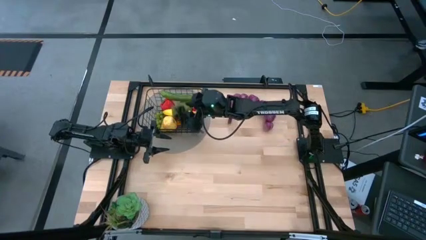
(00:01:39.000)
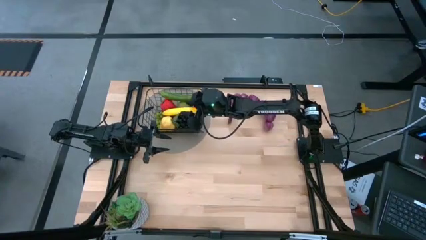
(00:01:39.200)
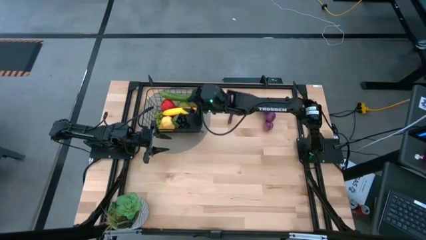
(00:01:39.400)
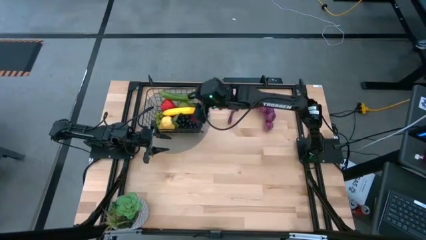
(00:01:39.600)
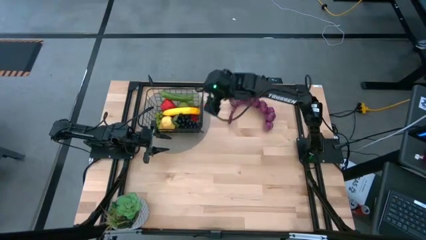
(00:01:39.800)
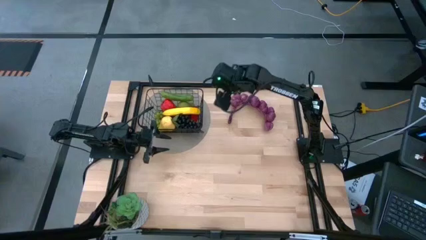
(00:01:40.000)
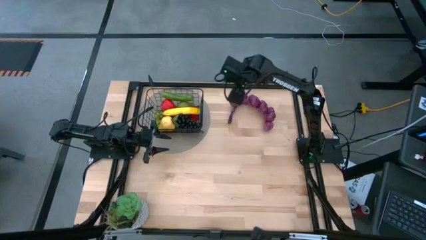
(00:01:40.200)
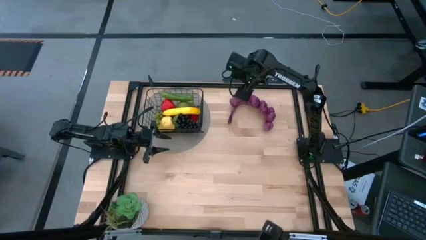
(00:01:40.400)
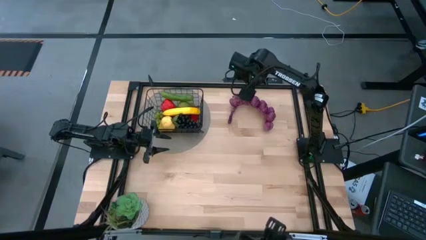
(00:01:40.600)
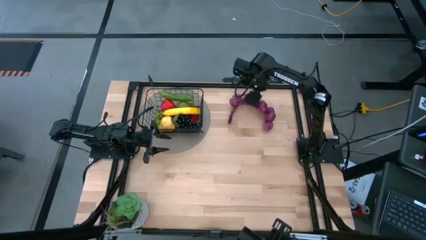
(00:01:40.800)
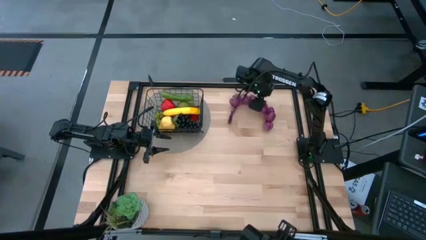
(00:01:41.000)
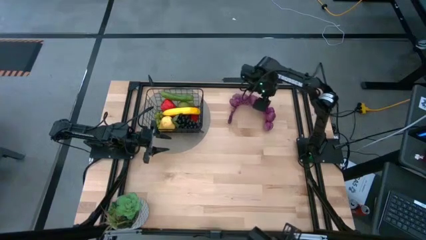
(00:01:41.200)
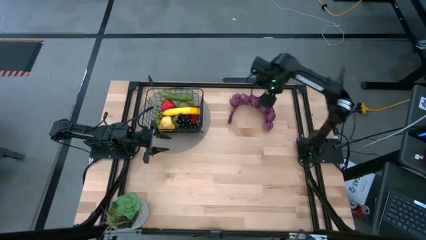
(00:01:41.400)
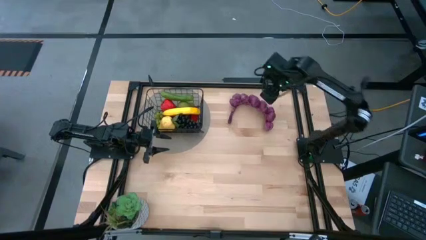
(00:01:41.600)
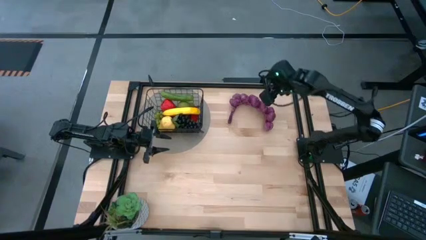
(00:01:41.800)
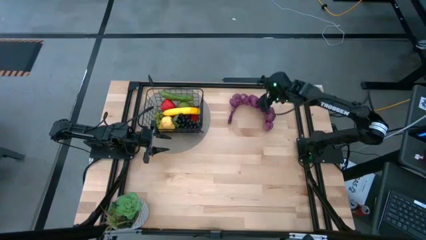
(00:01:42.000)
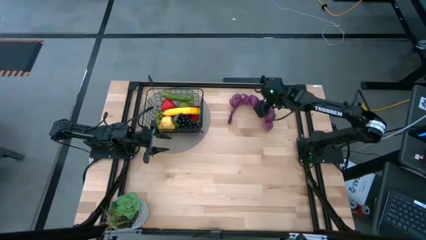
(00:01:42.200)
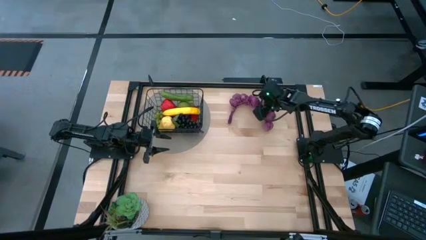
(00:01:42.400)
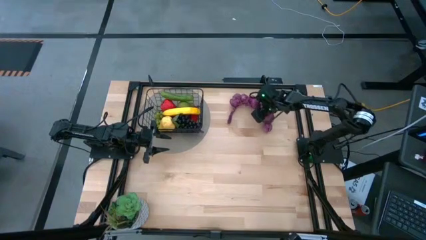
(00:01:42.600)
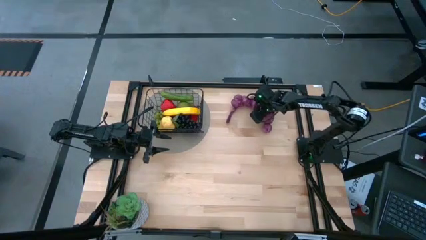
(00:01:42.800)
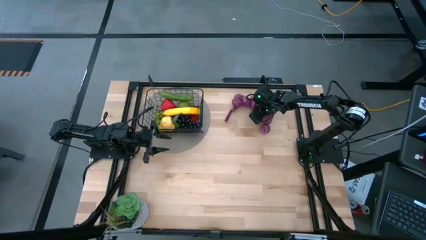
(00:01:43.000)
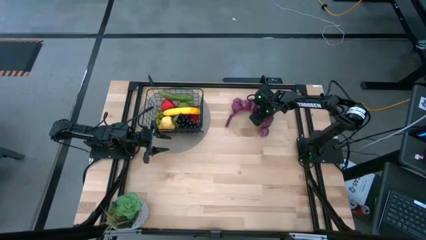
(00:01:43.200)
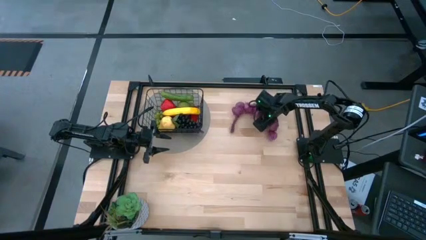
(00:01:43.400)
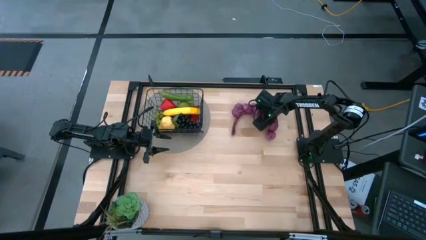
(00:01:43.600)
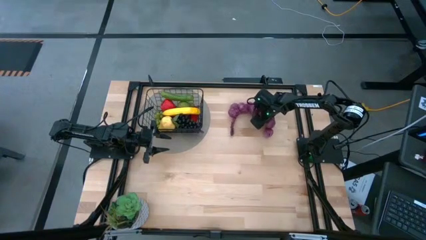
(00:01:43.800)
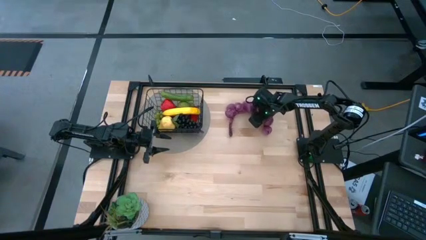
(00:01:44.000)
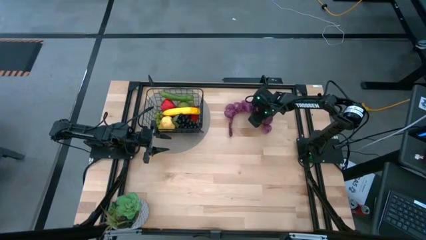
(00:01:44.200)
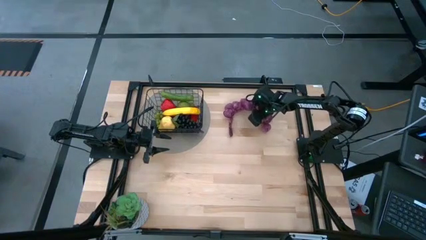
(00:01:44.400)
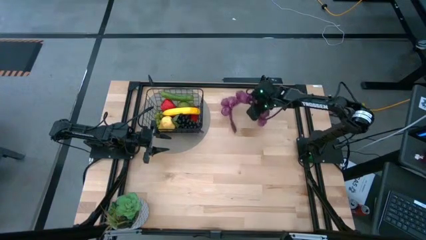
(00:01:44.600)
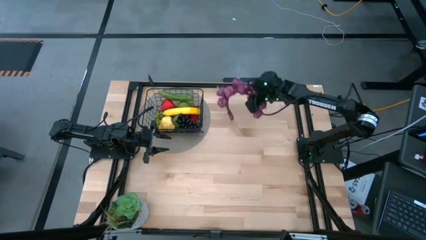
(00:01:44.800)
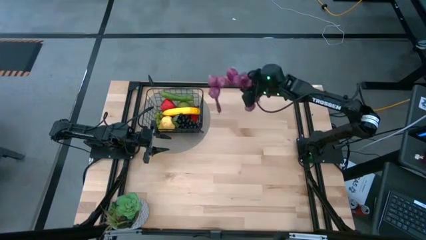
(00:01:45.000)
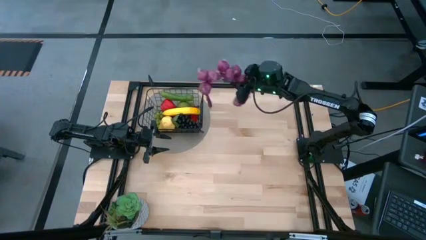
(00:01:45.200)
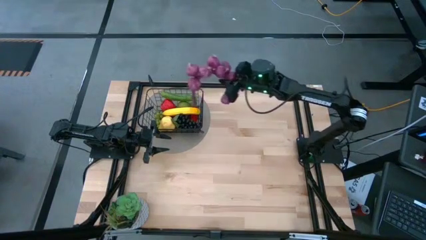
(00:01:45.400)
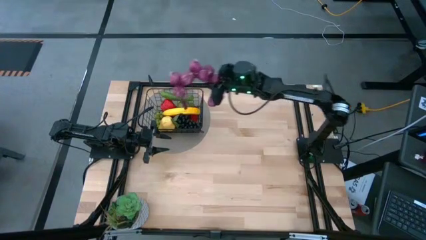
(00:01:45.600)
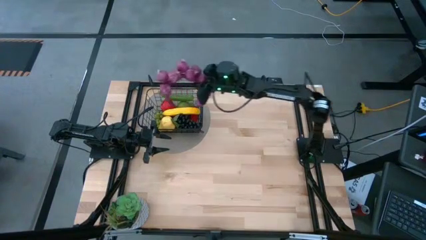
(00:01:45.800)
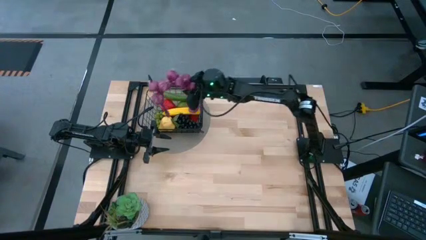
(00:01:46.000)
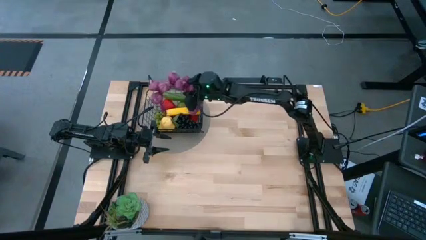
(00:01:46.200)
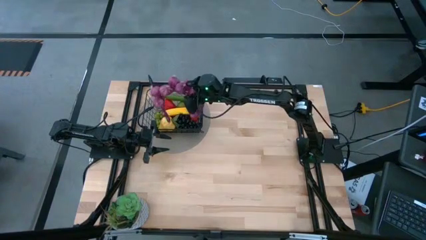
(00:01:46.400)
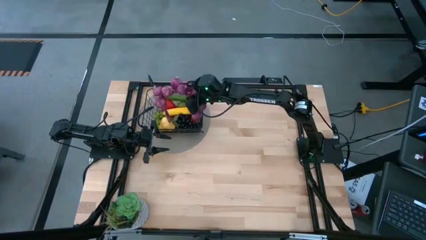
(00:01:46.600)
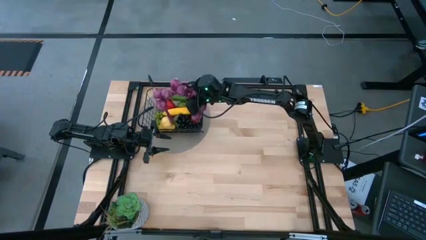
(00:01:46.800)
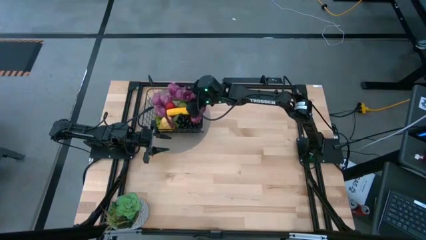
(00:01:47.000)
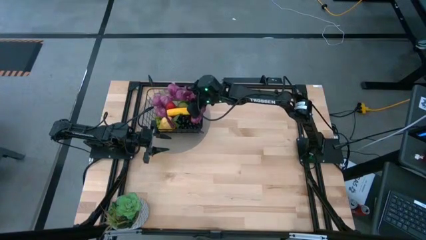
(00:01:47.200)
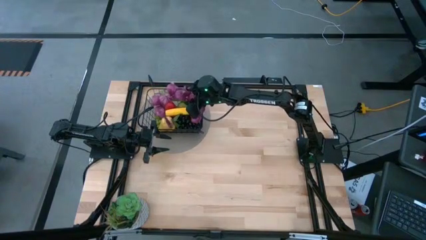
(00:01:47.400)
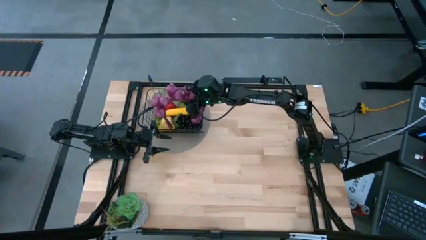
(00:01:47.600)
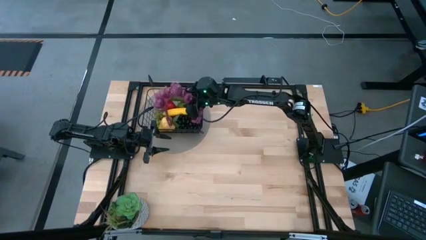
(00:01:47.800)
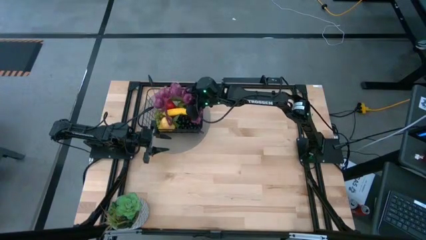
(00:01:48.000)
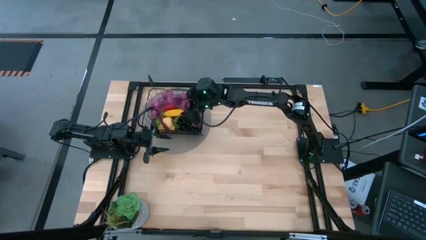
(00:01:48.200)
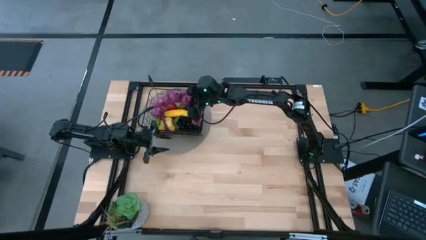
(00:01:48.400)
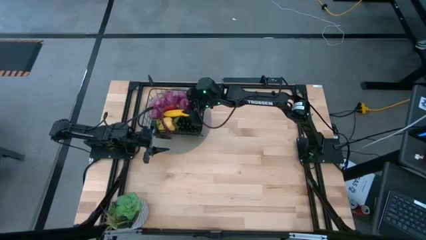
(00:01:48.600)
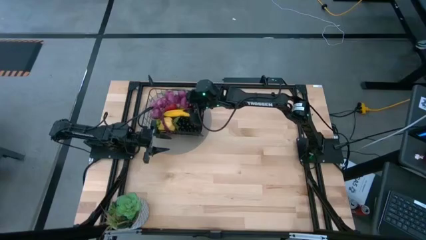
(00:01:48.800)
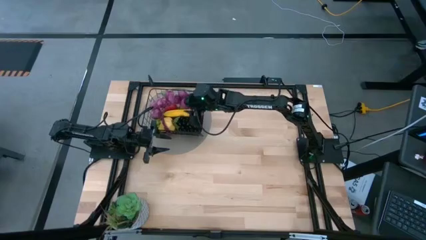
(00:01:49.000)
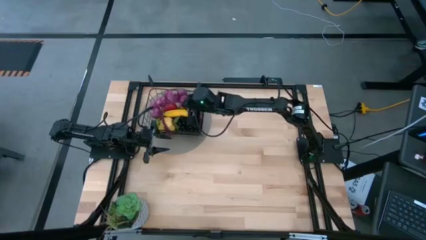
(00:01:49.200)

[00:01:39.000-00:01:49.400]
Task: Build produce basket
Put the garlic into the wire basket
